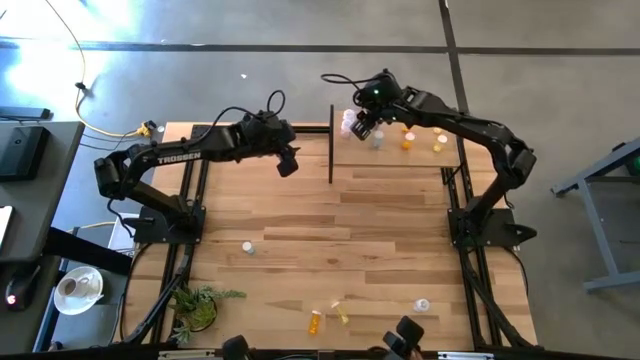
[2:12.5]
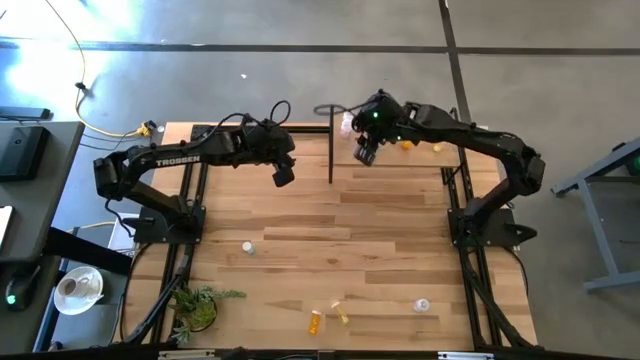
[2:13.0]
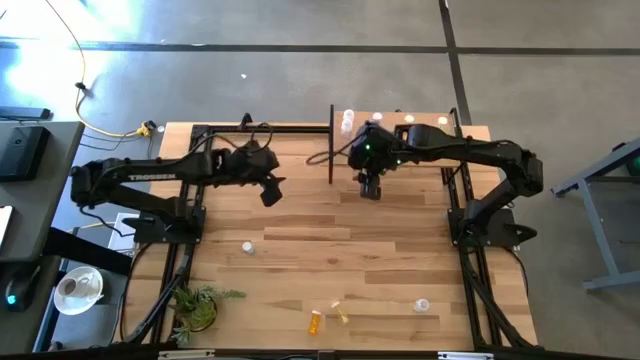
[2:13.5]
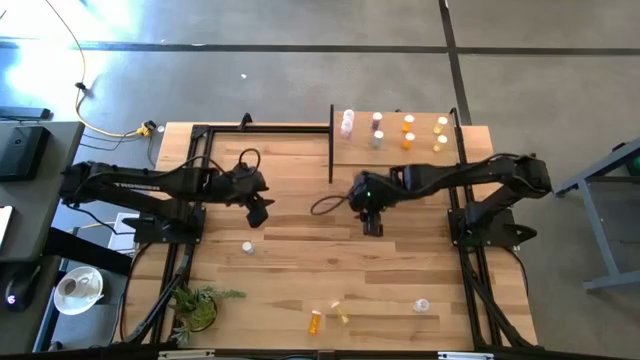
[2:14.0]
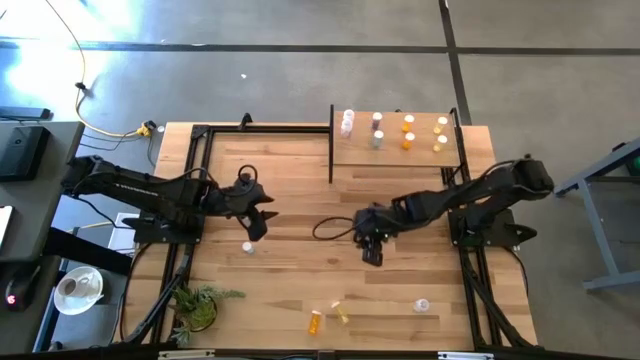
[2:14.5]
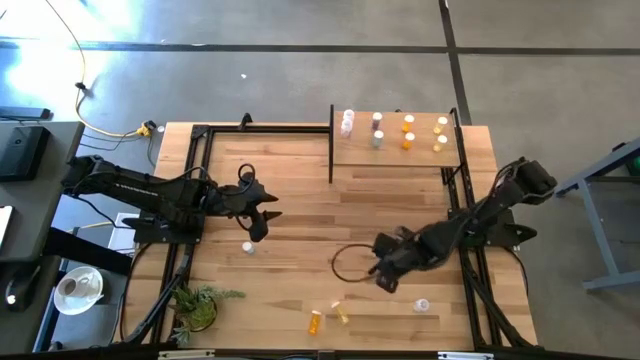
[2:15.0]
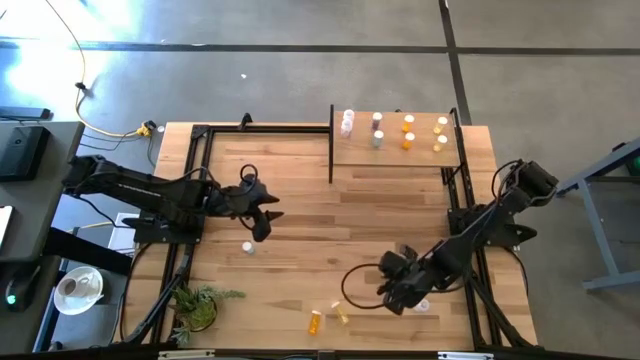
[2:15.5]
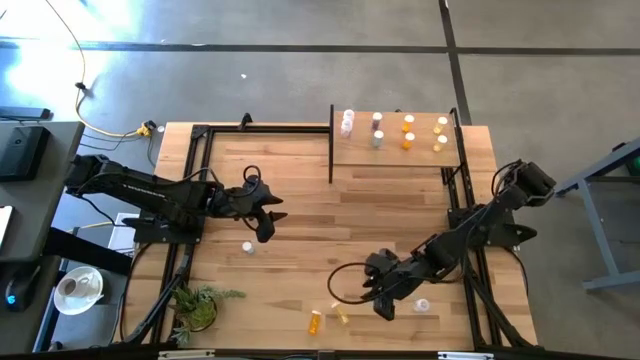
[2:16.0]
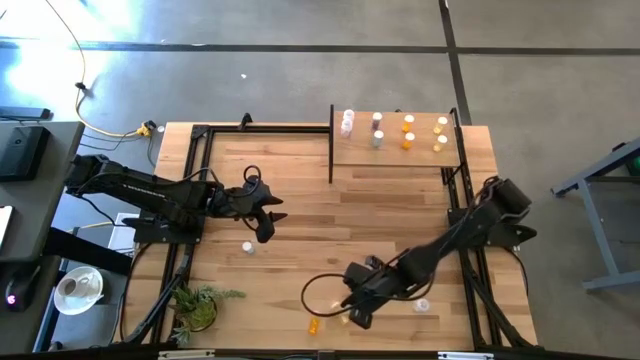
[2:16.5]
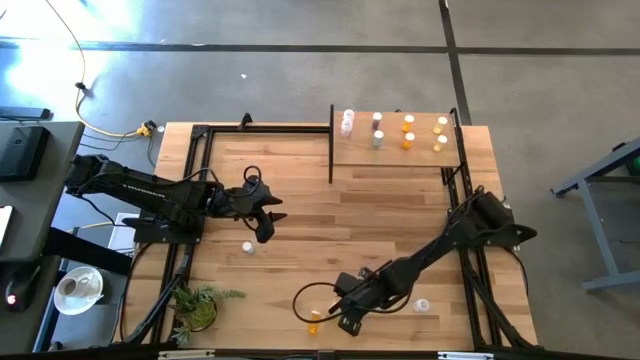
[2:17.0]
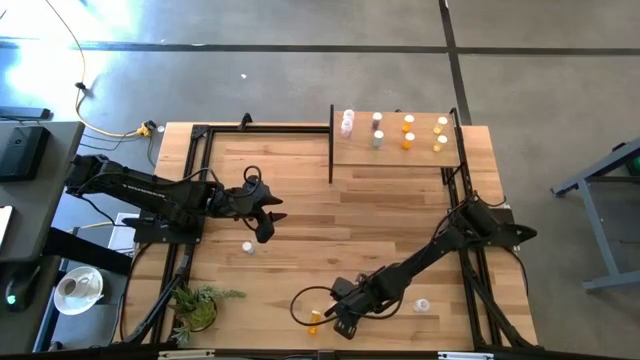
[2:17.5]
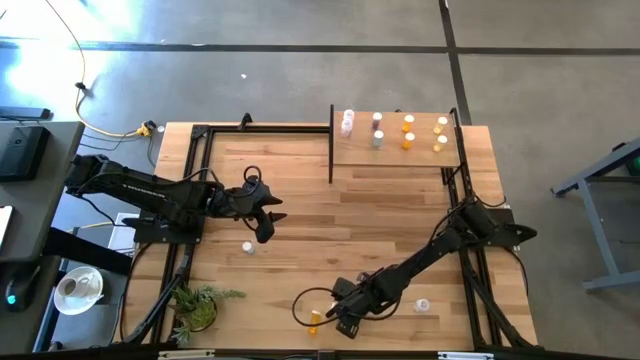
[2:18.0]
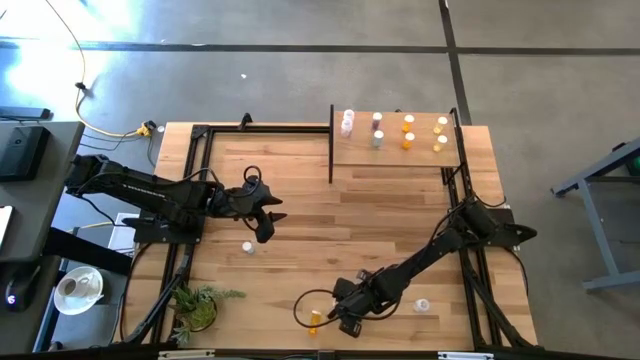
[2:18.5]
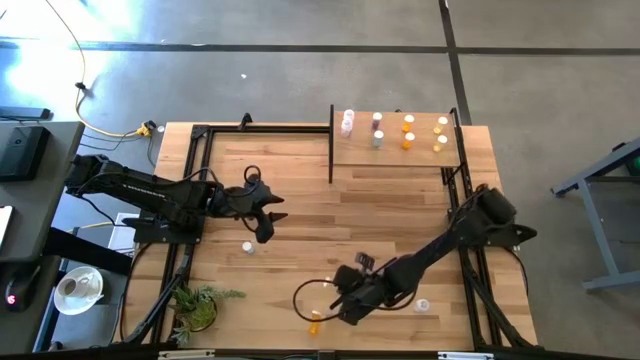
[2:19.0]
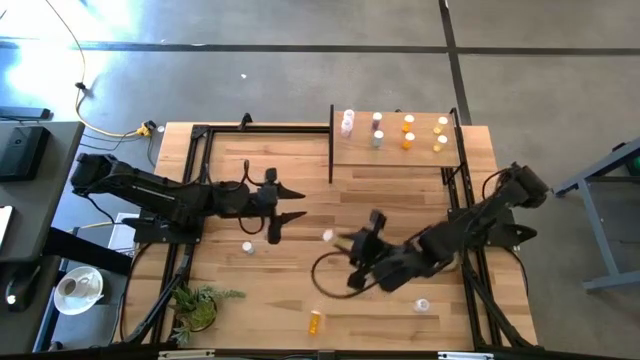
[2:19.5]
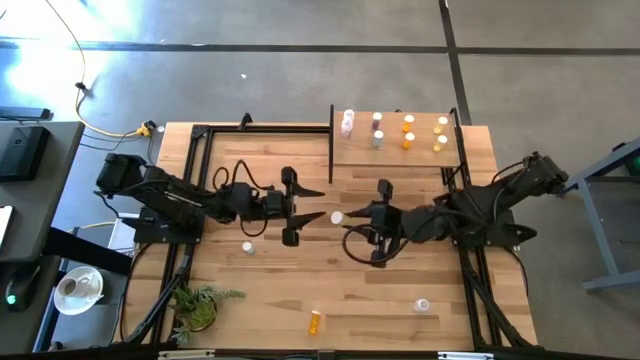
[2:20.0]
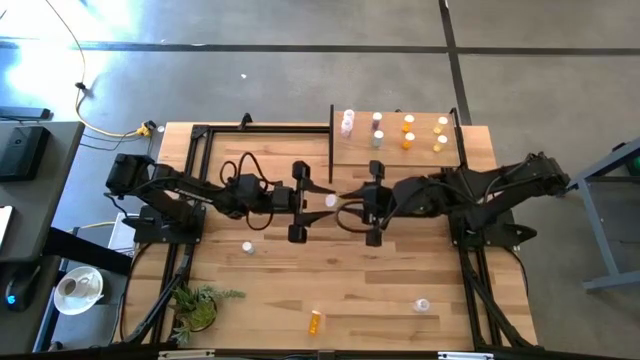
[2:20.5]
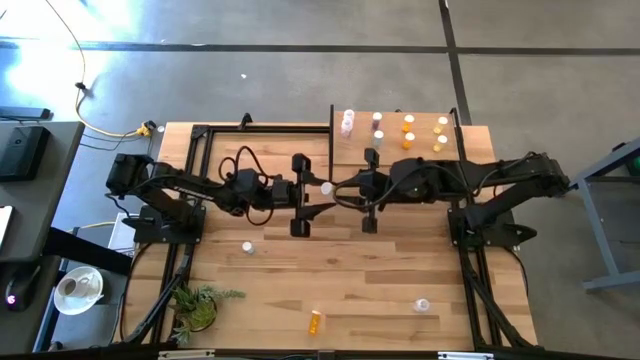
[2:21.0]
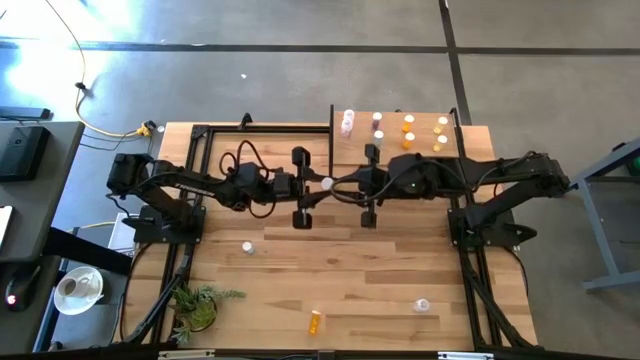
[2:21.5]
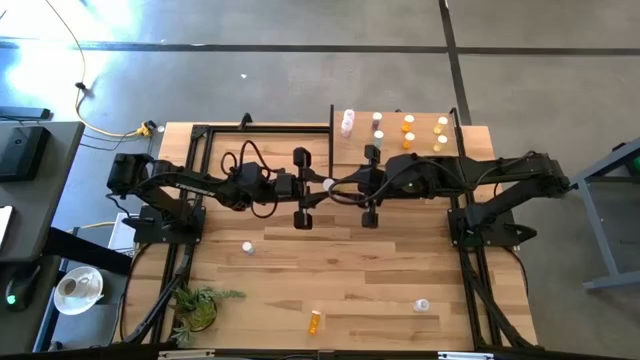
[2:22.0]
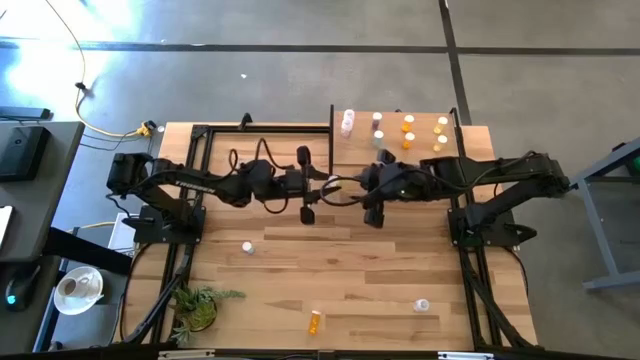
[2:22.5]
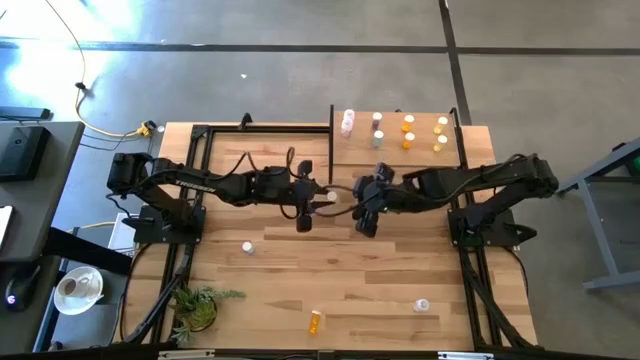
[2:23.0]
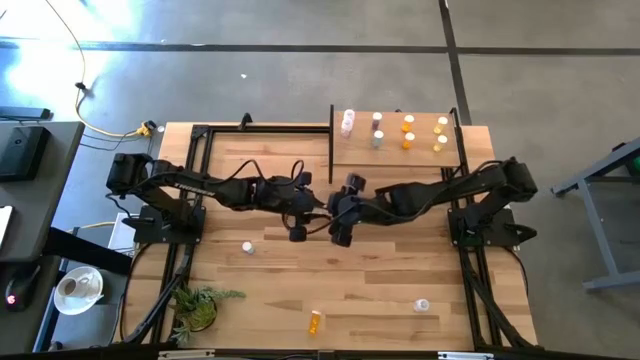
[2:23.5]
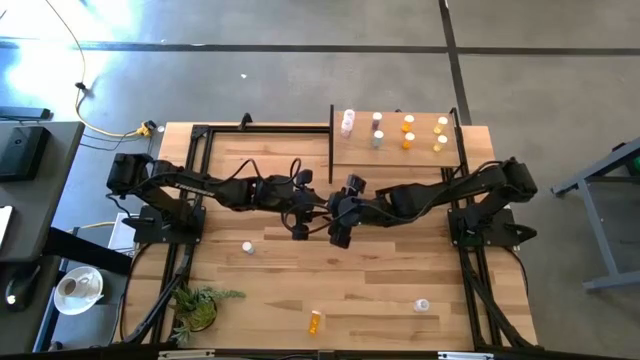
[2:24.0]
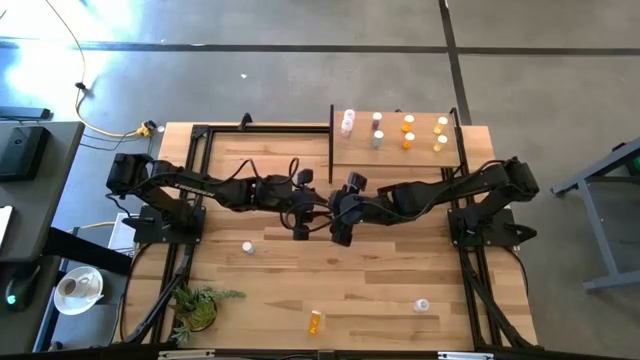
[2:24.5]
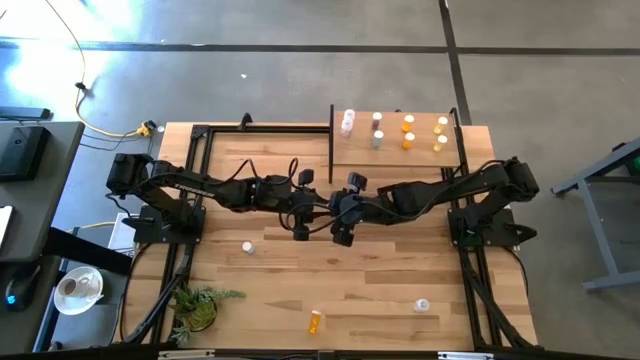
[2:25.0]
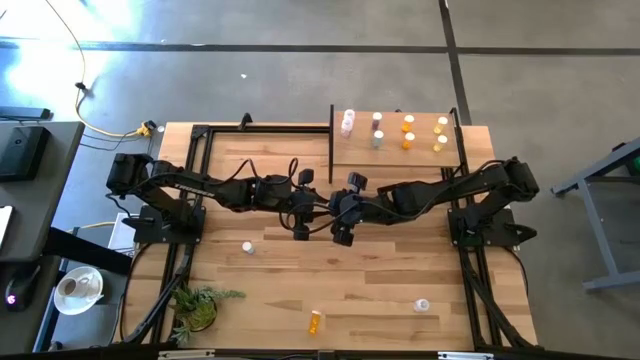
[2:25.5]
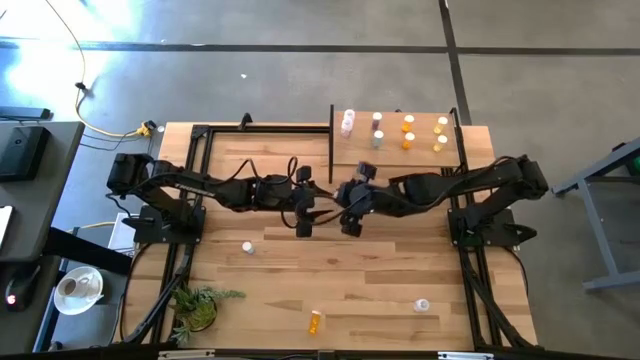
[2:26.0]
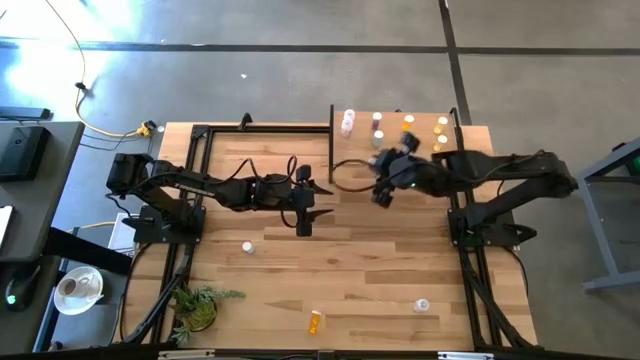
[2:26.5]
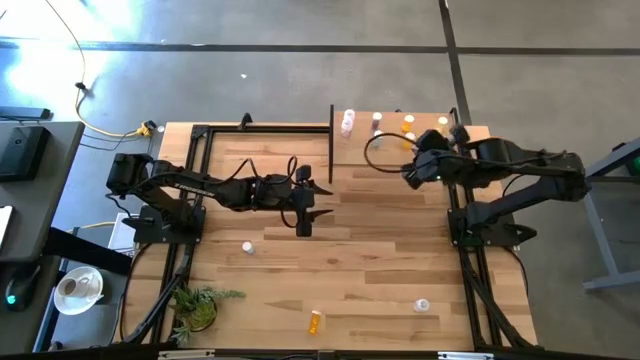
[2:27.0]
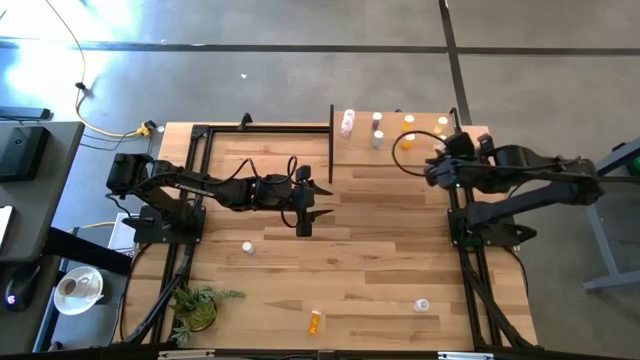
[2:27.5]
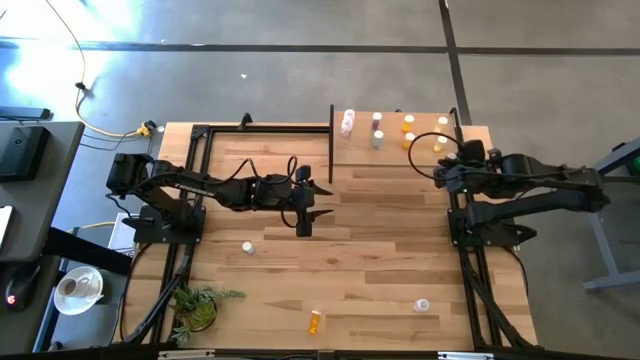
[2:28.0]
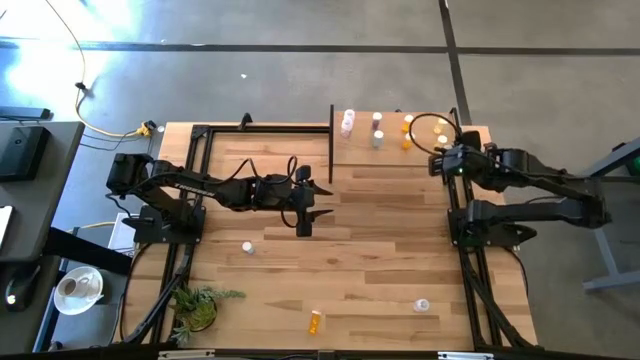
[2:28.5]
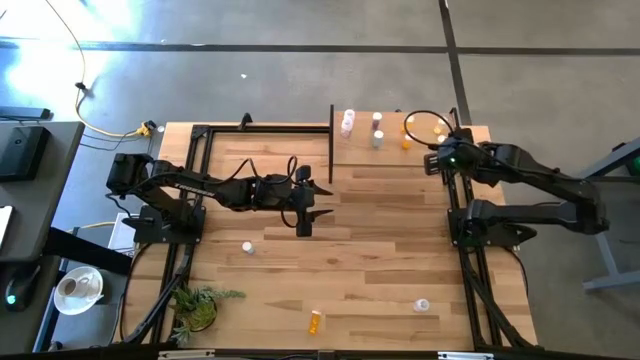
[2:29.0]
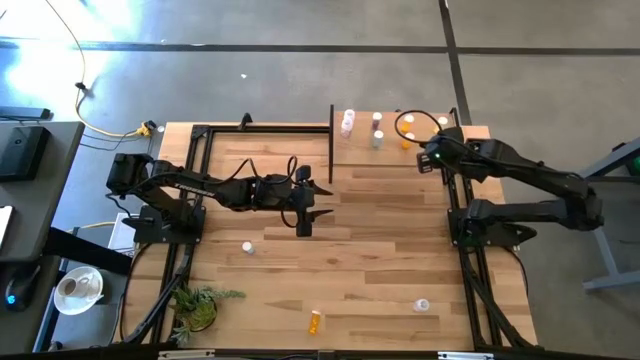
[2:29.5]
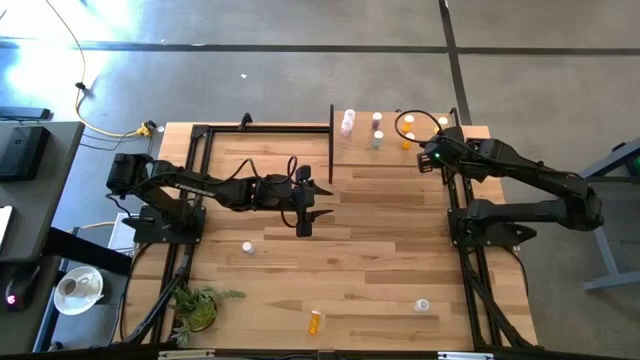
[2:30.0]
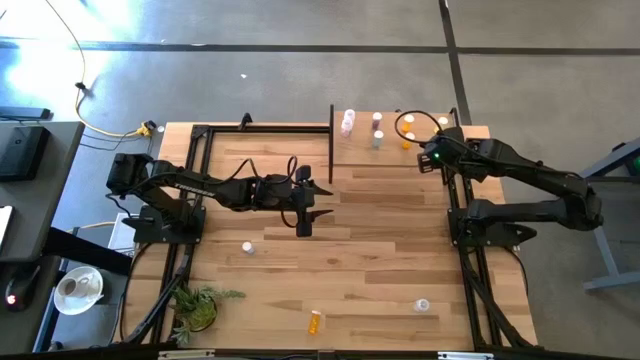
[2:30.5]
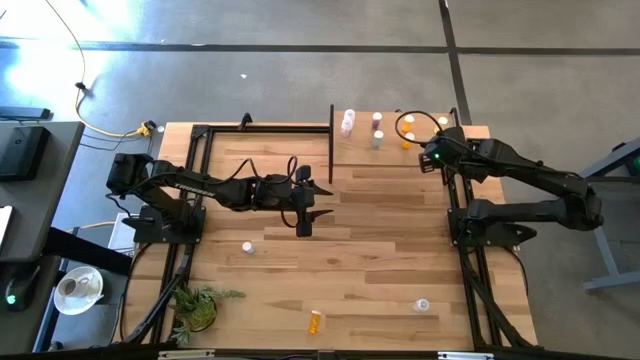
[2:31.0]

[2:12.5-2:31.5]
Task: Pick and place medicine bottles onto shelf by color
Put the yellow pill bottle on the shelf aligned with the other yellow pill bottles

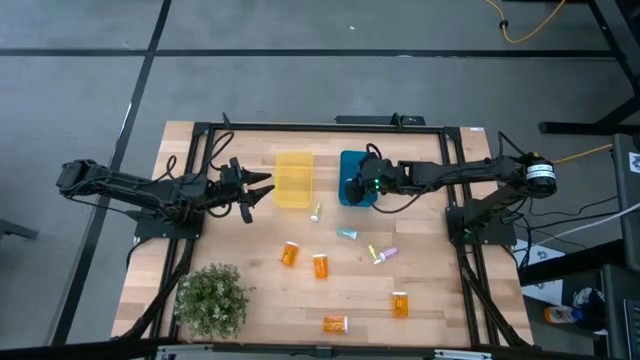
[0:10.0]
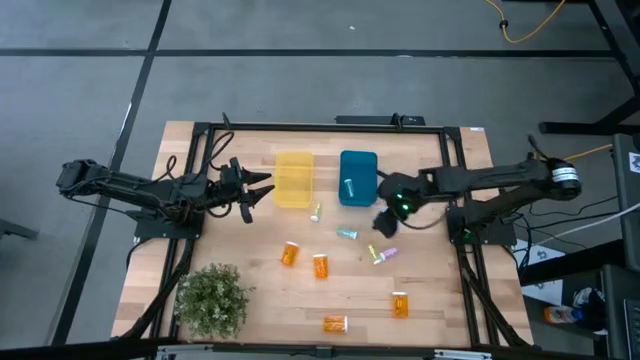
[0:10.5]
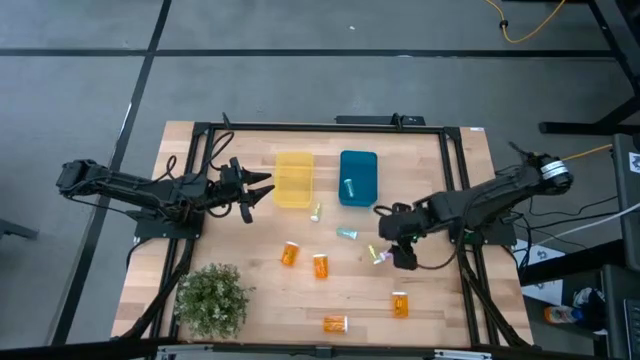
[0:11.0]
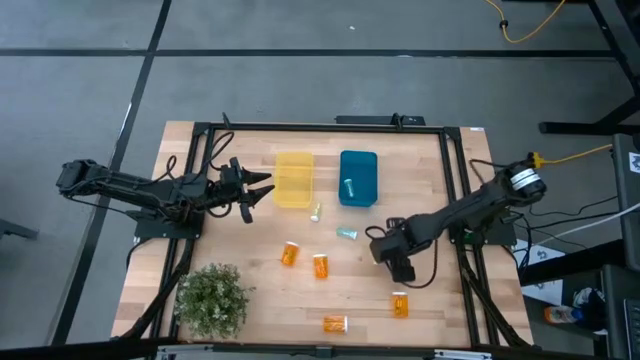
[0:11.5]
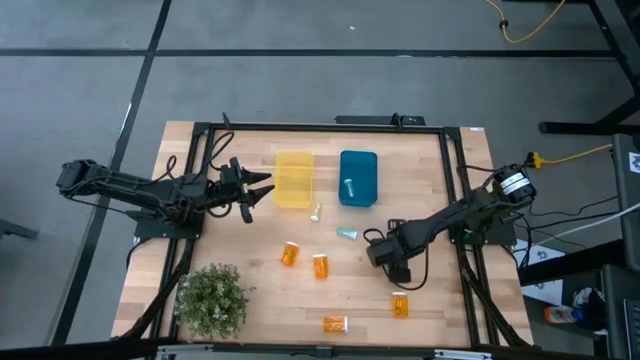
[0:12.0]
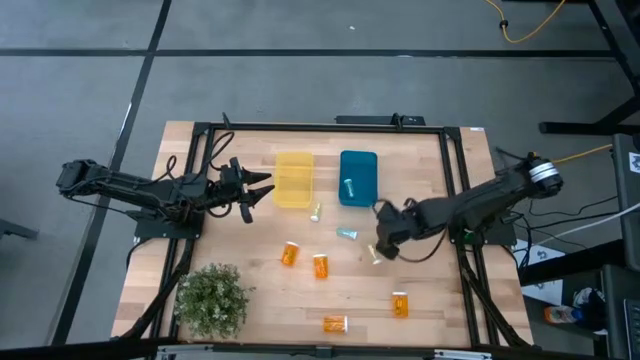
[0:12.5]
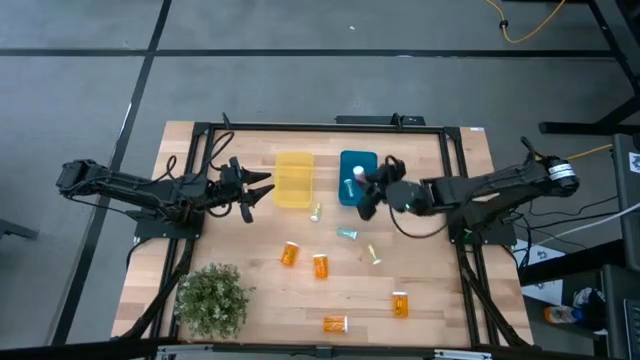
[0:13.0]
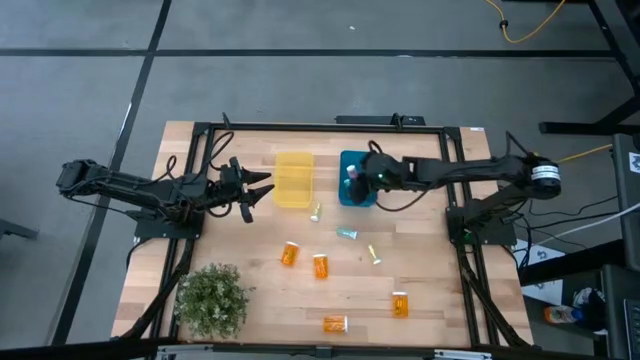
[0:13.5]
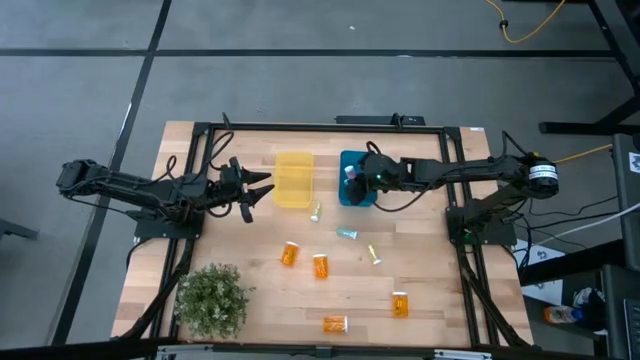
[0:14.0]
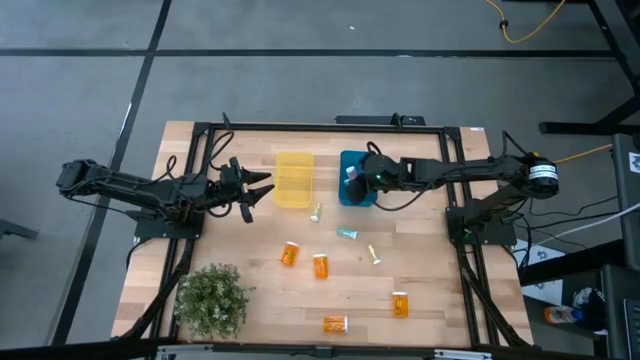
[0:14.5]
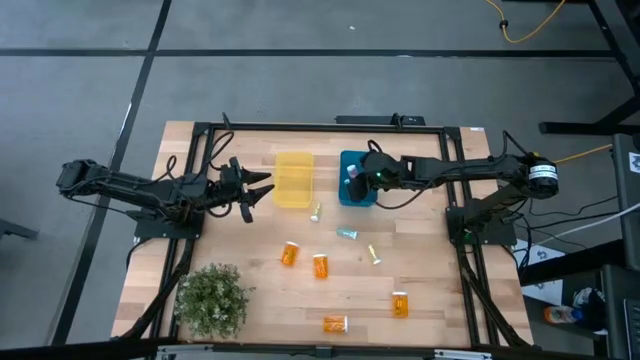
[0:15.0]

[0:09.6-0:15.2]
Task: Pick and place medicine bottles into bin by pill shape (circle, oval)
Put the purple pill bottle into the blue bin
